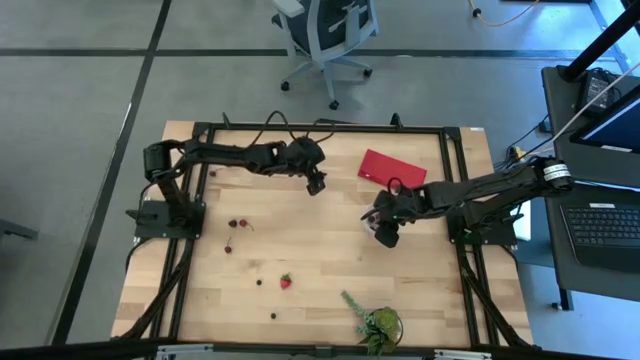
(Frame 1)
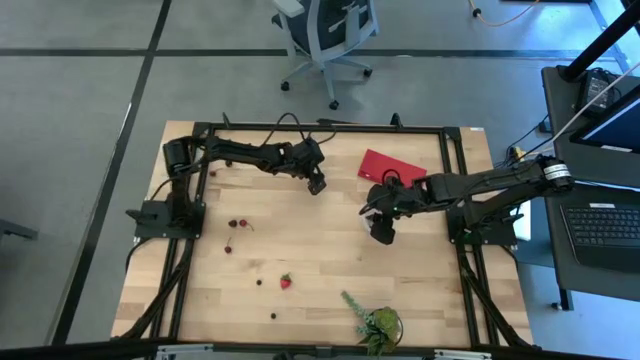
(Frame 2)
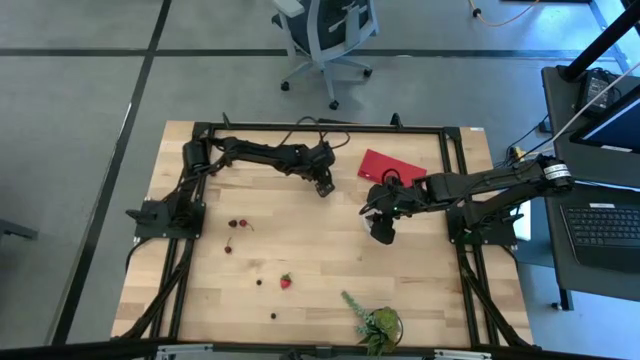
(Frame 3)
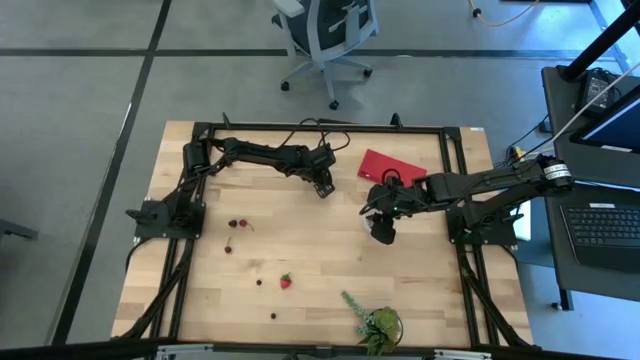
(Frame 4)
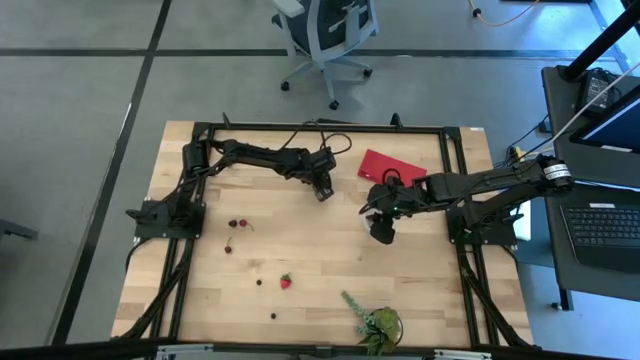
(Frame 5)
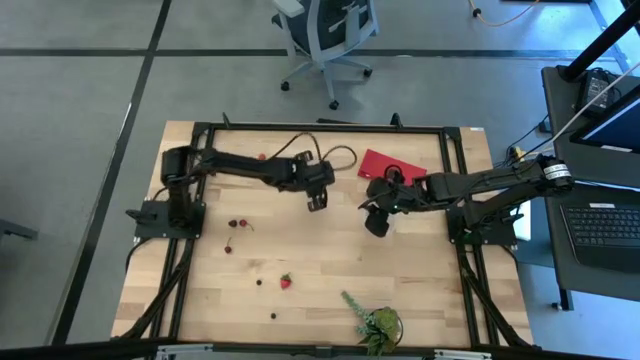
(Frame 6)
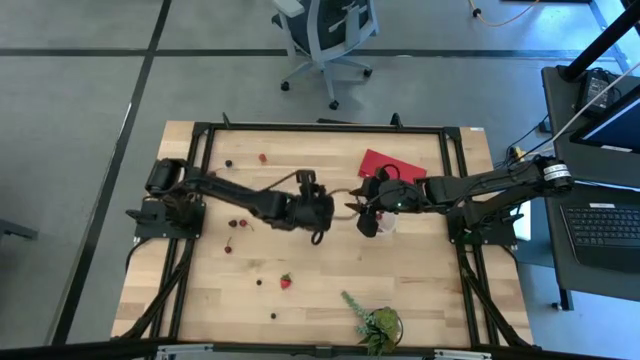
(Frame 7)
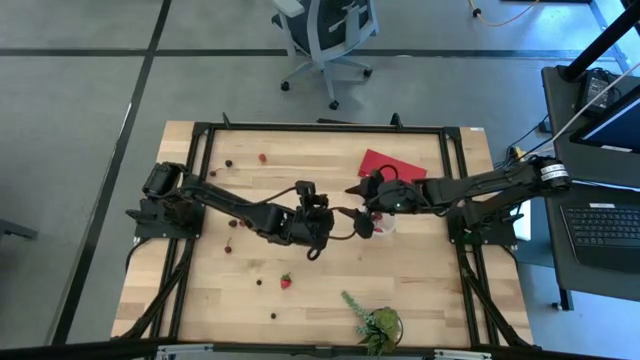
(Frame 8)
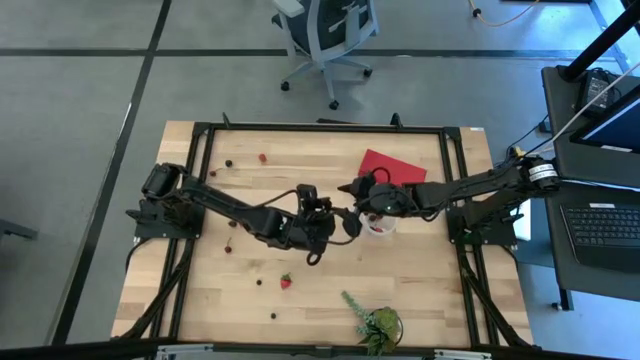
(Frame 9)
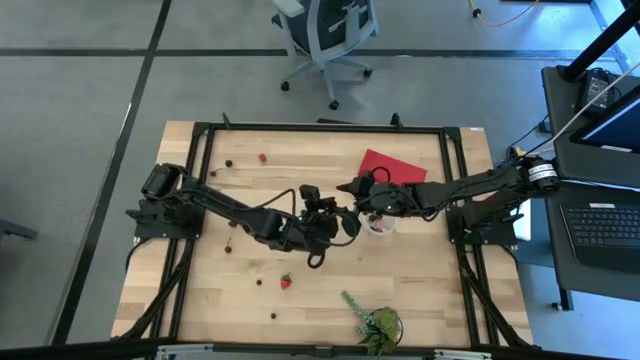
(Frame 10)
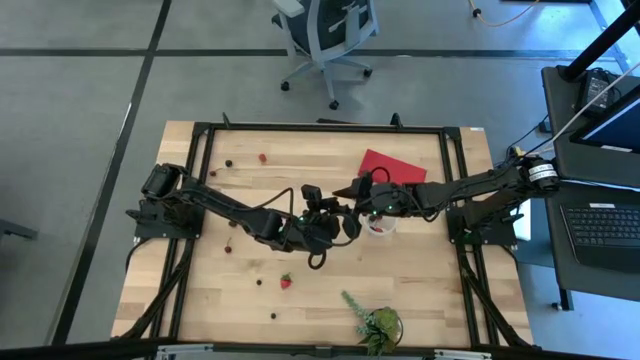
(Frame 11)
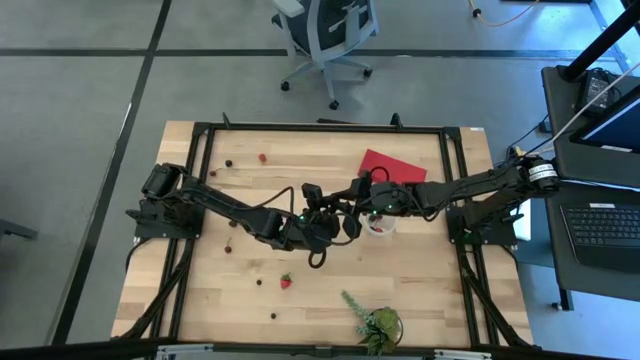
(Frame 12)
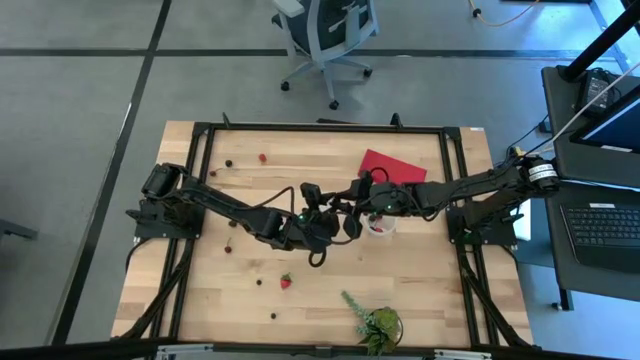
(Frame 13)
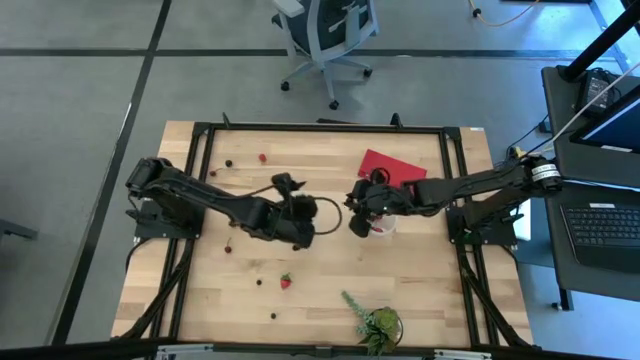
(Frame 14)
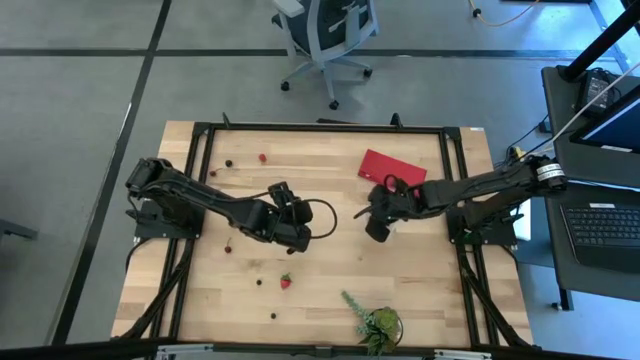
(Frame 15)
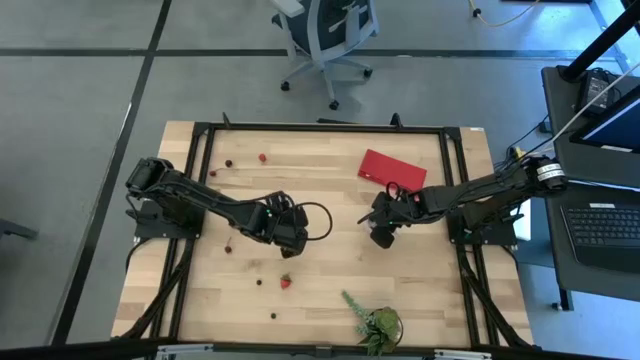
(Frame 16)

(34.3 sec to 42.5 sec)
Task: Pick and placing Produce into tupperware
Put the right black cherry into the transparent container

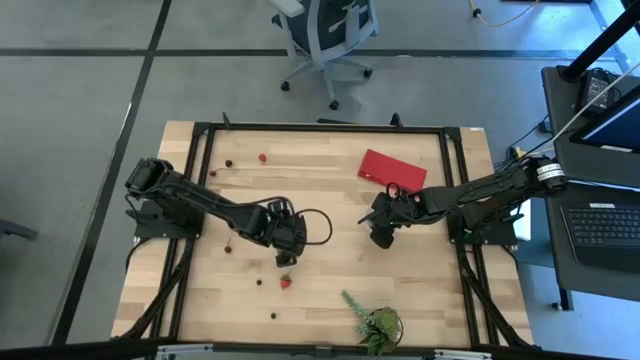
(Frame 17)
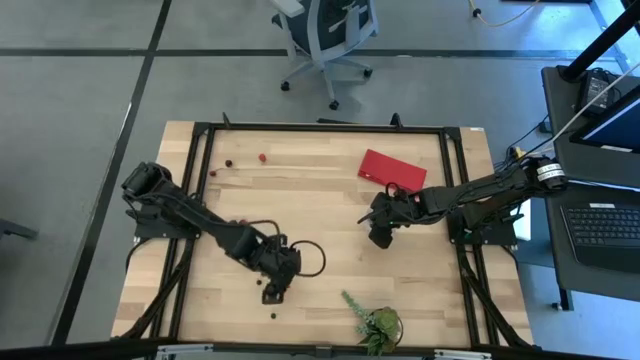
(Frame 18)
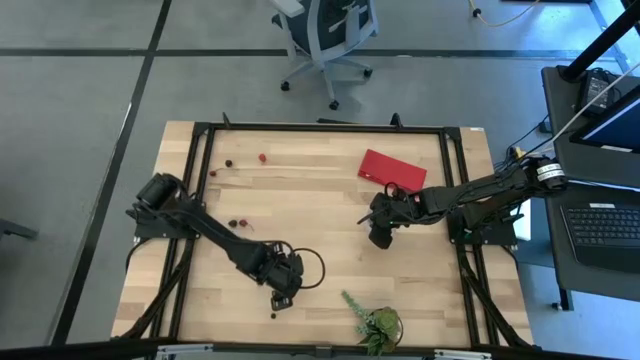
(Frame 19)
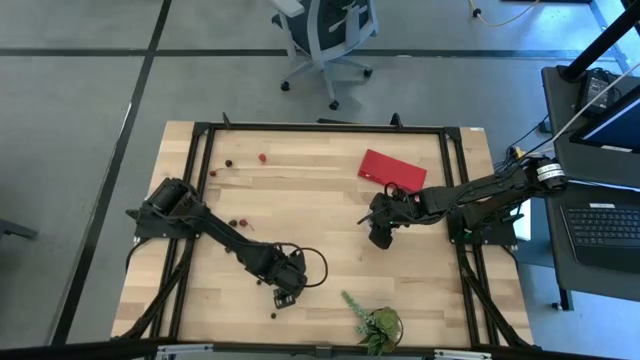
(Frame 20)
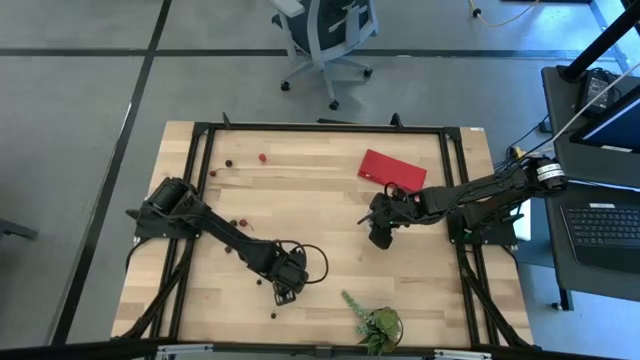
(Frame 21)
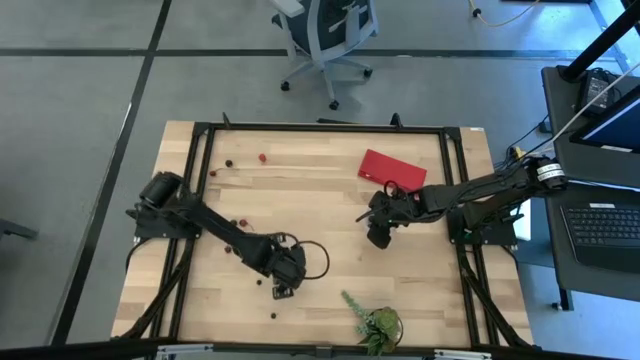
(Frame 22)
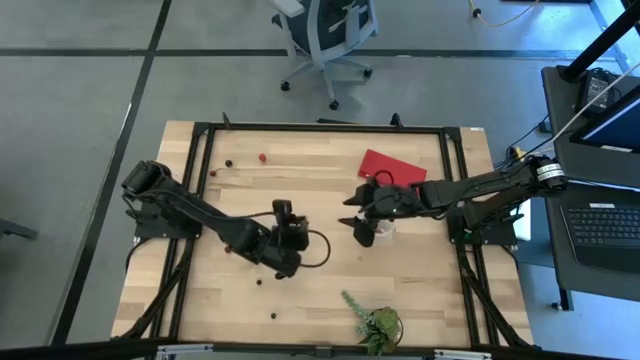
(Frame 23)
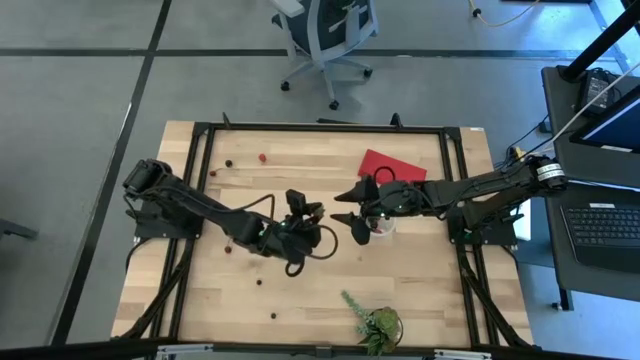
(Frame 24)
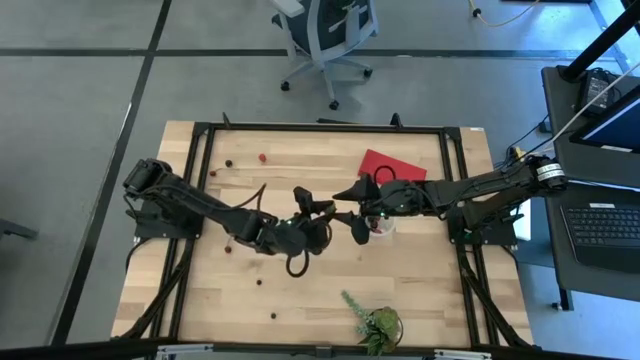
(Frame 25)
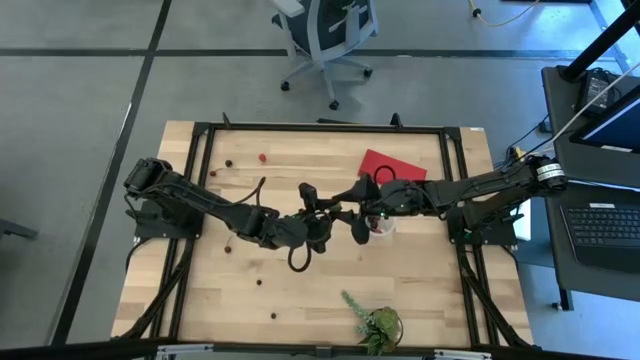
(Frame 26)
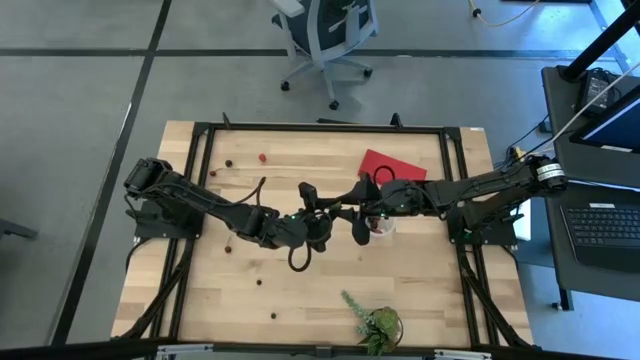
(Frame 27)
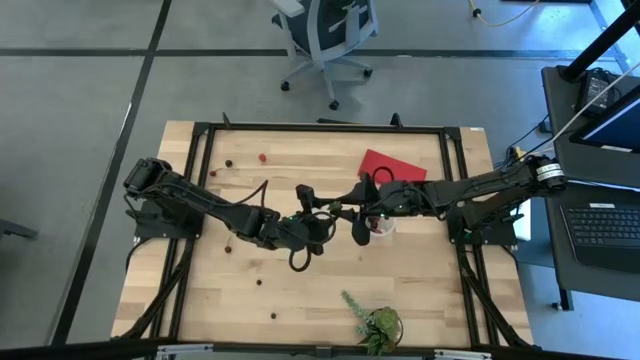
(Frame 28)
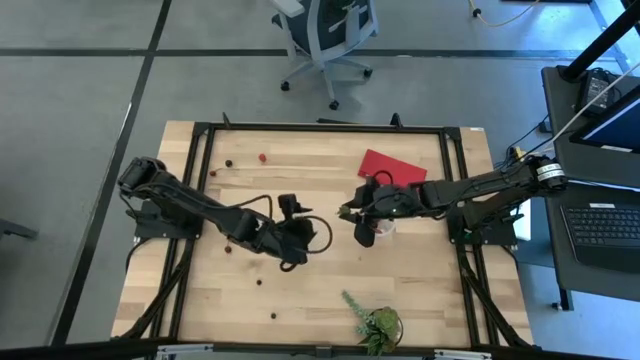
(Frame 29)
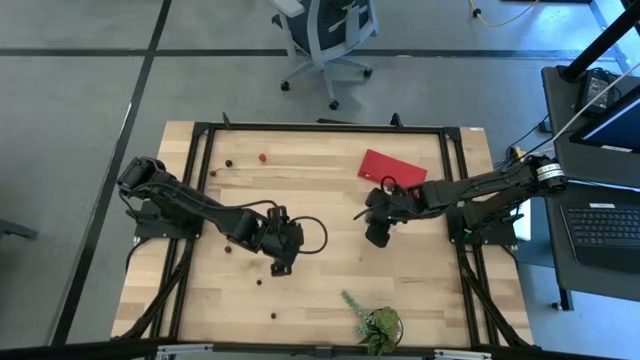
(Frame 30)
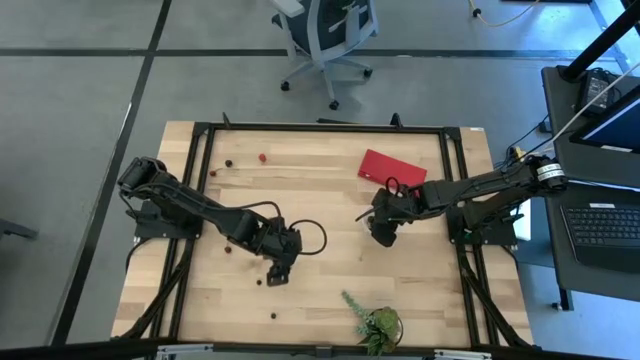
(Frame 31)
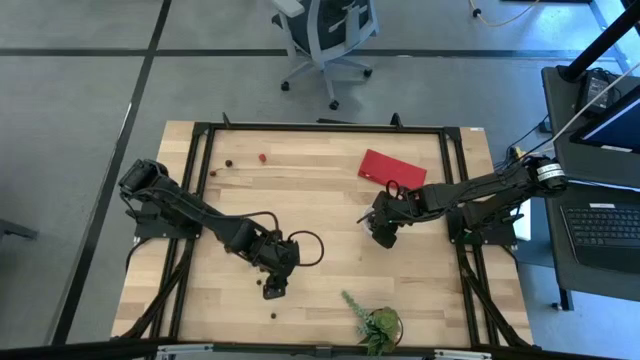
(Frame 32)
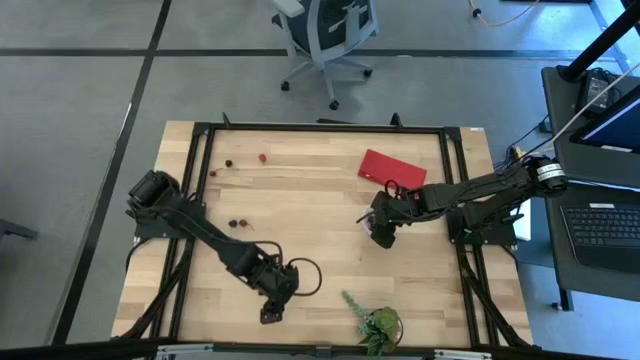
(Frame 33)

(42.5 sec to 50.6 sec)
Put the red strawberry into the transparent container

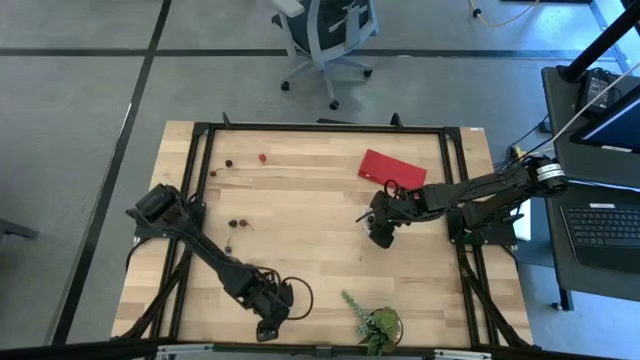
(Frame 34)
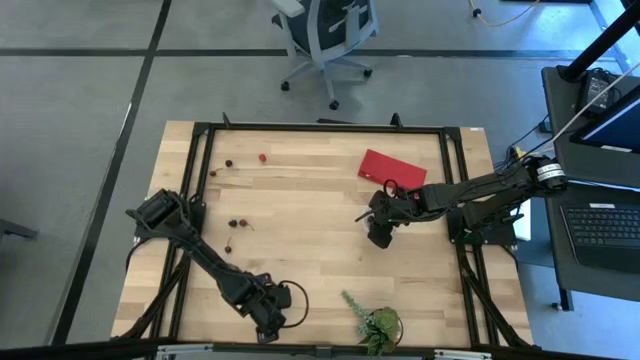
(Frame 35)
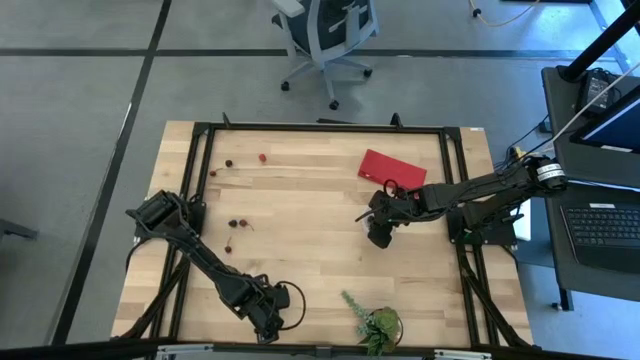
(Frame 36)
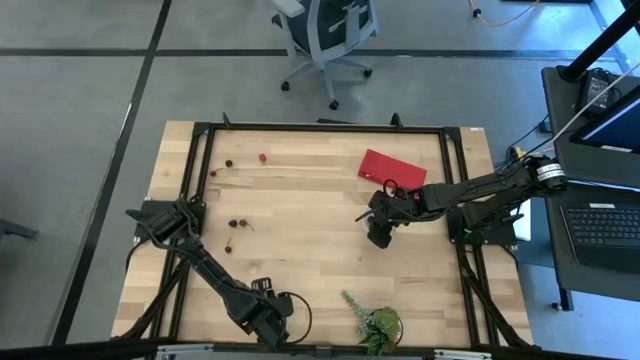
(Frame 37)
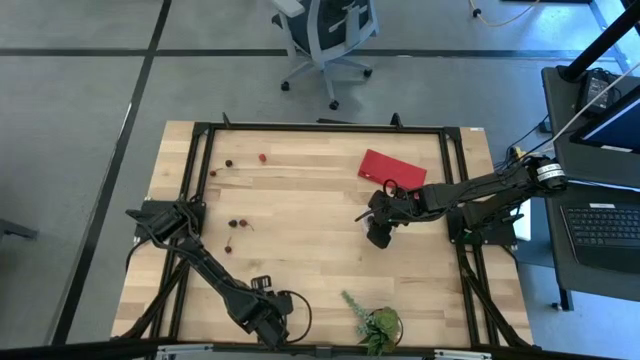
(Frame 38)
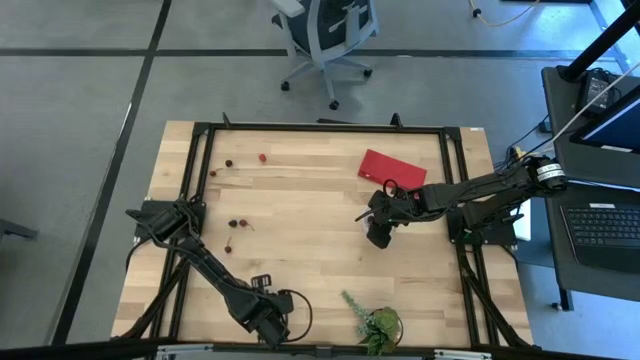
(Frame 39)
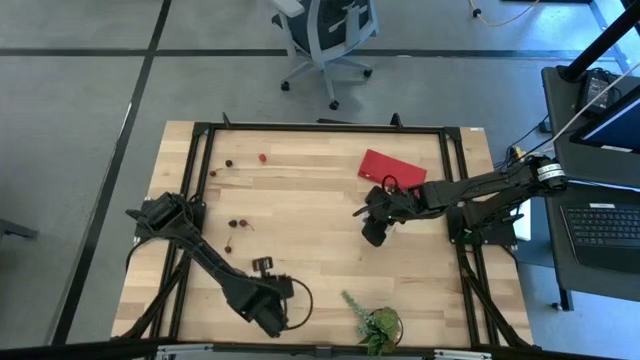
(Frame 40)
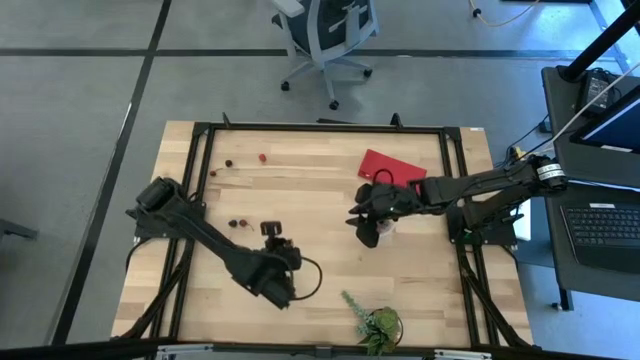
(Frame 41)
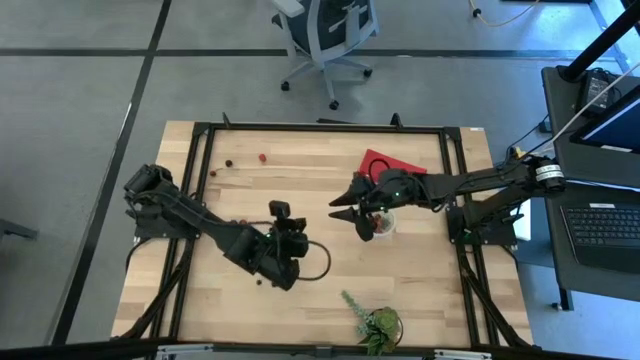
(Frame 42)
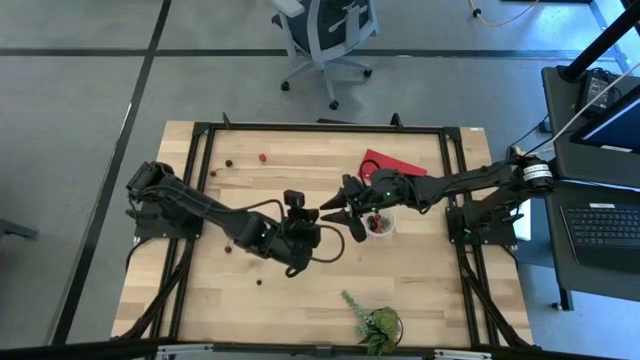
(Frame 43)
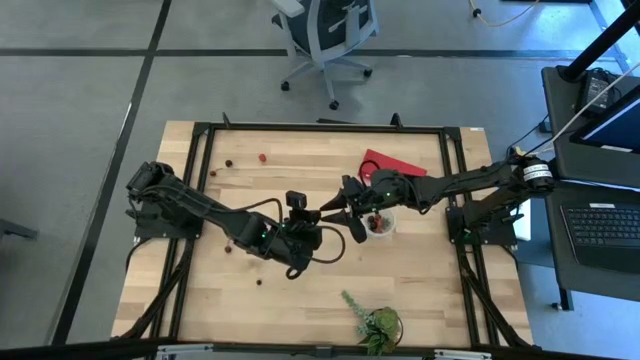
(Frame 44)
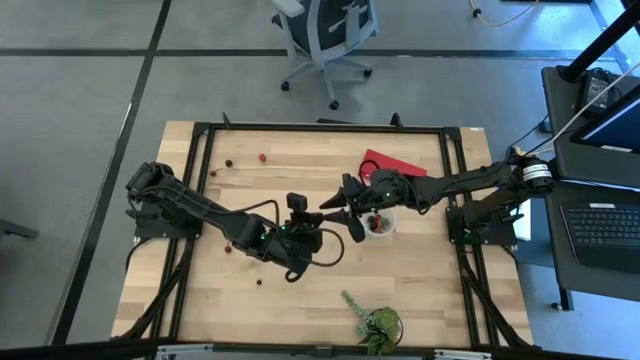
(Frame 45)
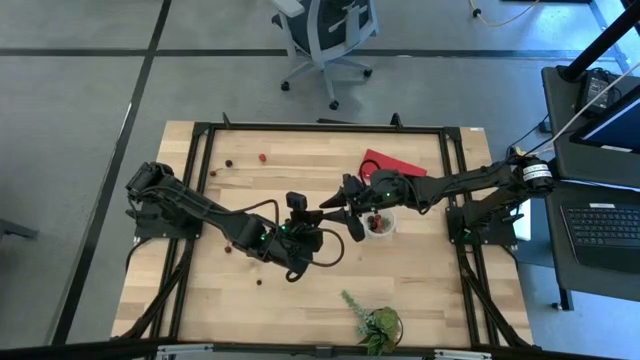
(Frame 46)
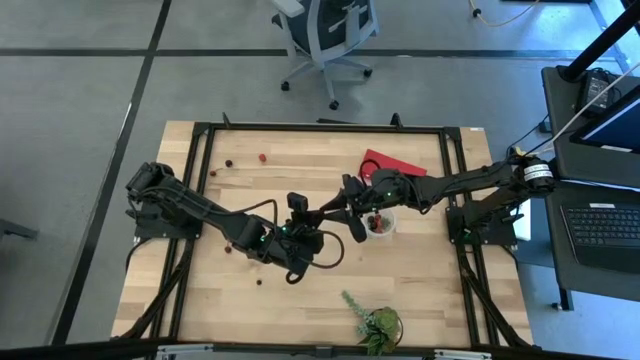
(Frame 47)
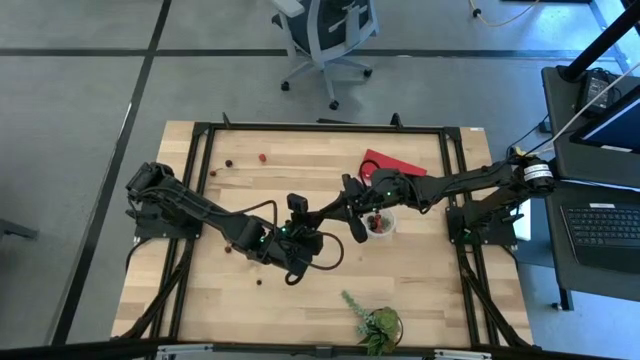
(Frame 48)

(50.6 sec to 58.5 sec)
Put the bottom blueberry into the transparent container
